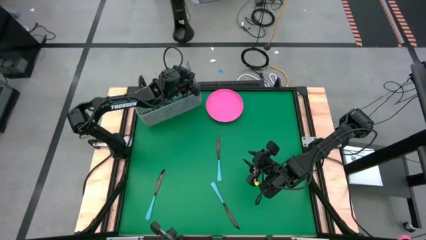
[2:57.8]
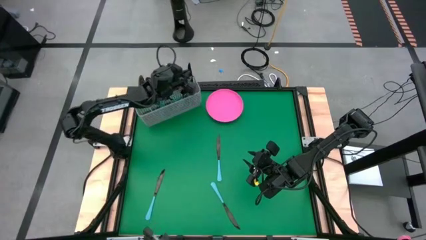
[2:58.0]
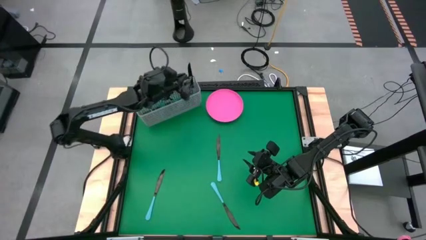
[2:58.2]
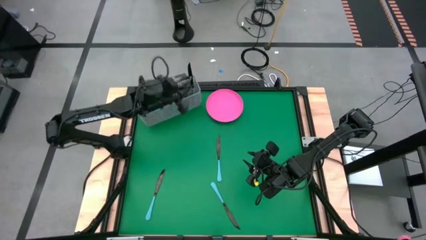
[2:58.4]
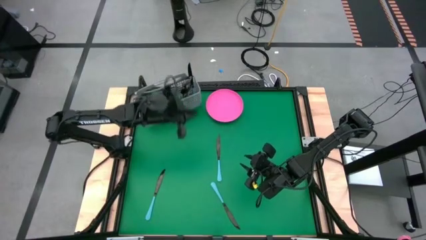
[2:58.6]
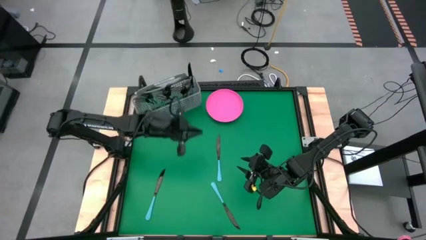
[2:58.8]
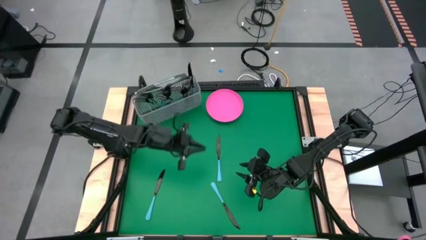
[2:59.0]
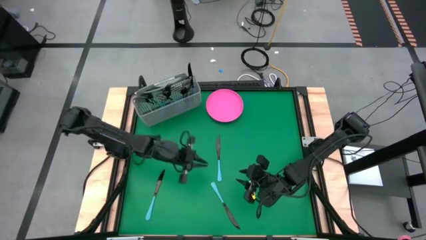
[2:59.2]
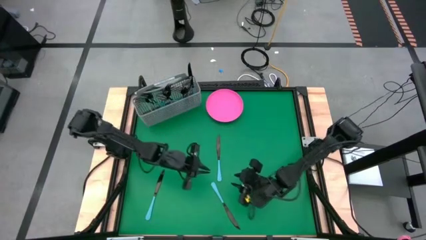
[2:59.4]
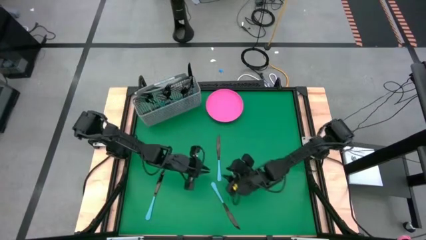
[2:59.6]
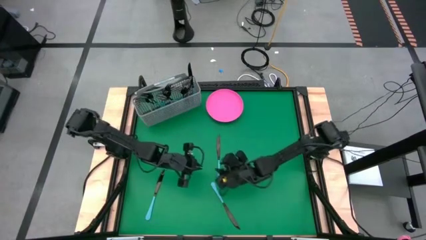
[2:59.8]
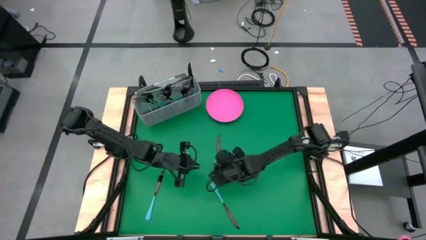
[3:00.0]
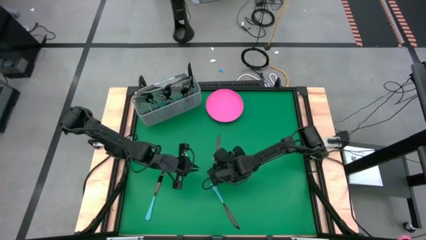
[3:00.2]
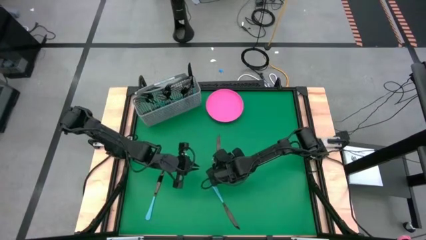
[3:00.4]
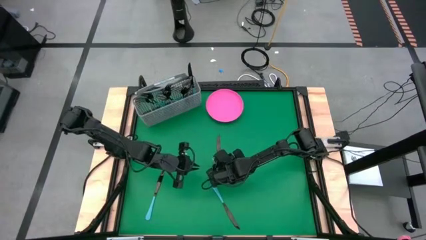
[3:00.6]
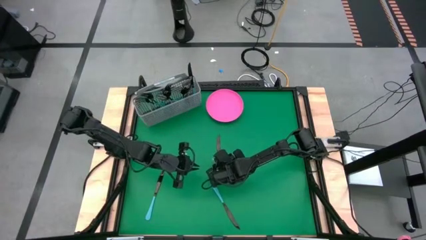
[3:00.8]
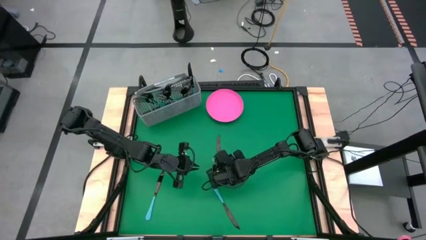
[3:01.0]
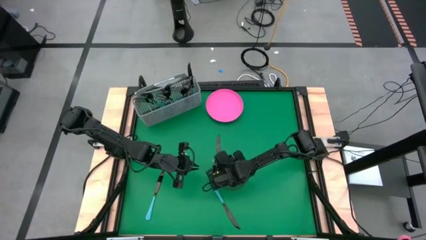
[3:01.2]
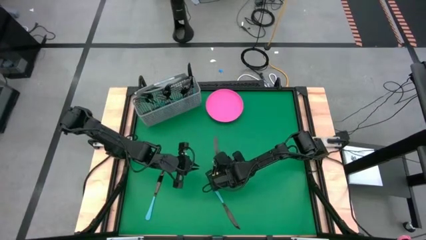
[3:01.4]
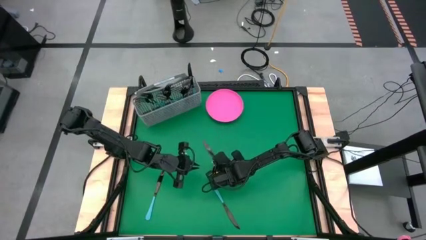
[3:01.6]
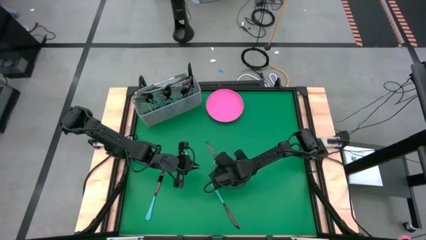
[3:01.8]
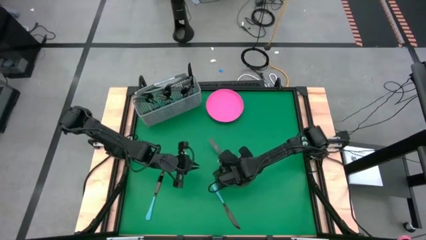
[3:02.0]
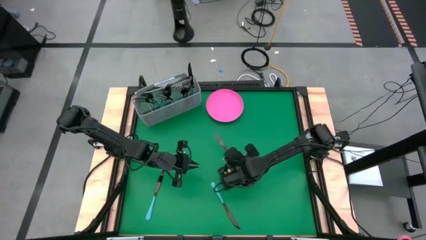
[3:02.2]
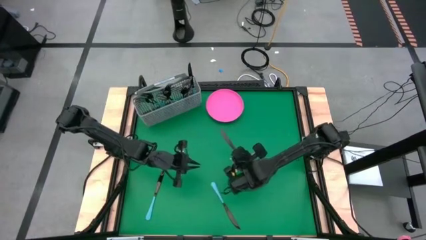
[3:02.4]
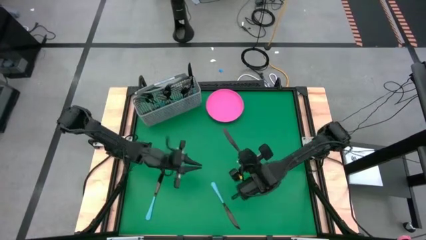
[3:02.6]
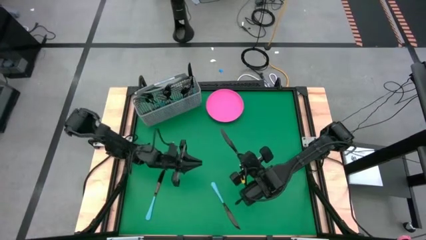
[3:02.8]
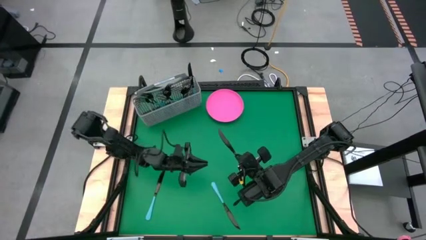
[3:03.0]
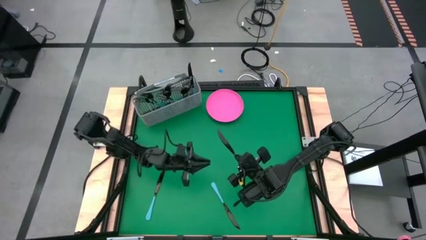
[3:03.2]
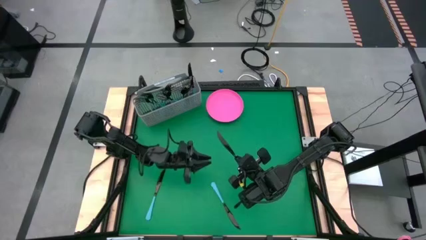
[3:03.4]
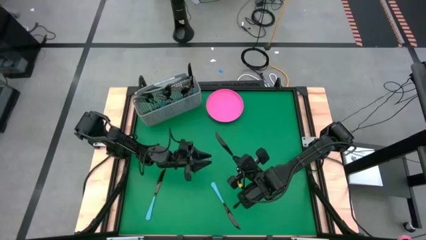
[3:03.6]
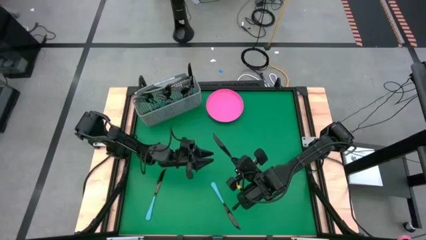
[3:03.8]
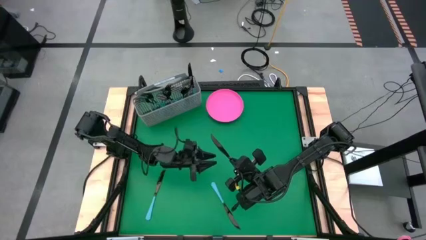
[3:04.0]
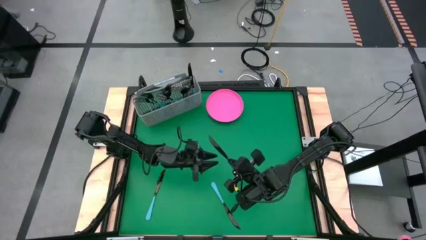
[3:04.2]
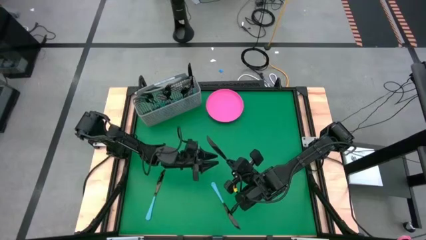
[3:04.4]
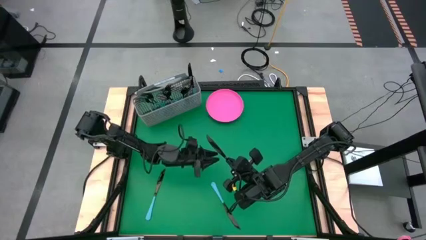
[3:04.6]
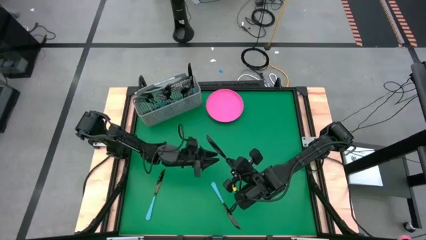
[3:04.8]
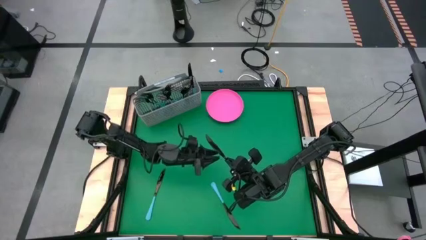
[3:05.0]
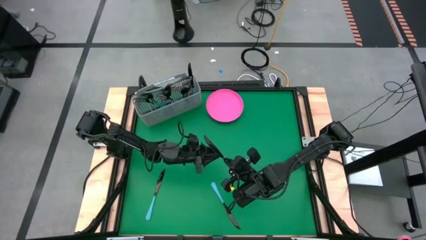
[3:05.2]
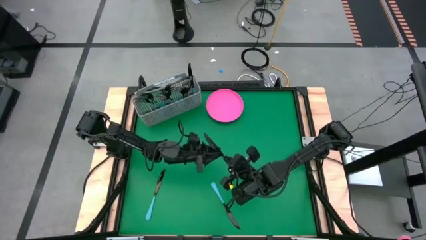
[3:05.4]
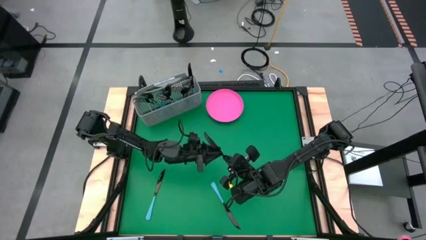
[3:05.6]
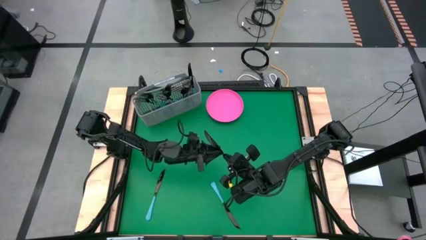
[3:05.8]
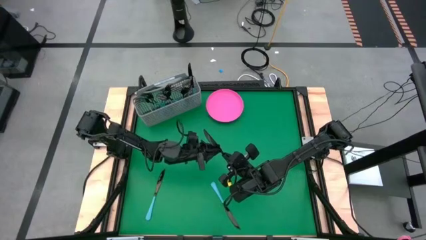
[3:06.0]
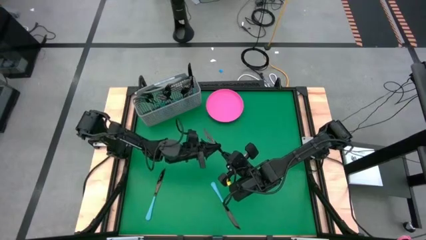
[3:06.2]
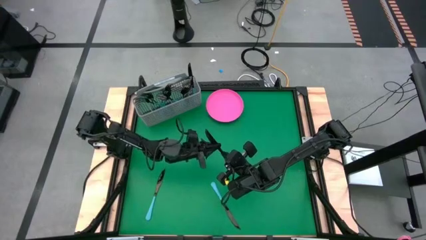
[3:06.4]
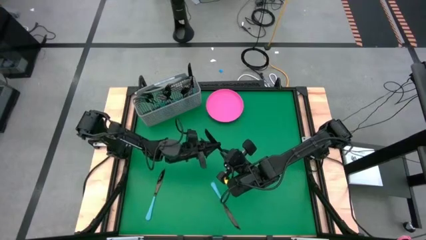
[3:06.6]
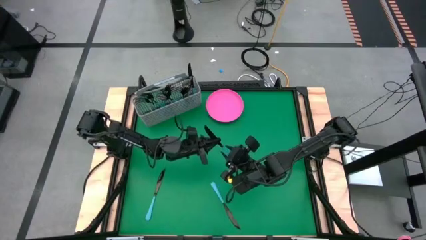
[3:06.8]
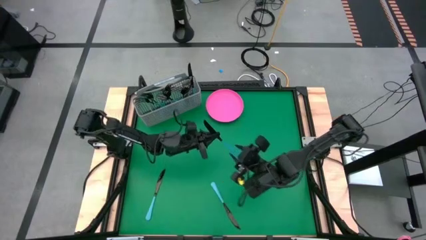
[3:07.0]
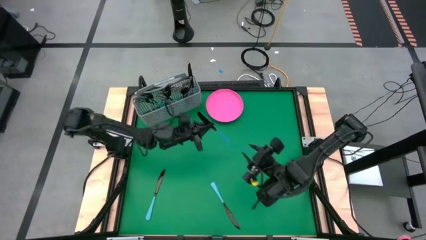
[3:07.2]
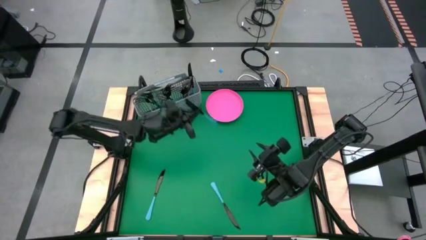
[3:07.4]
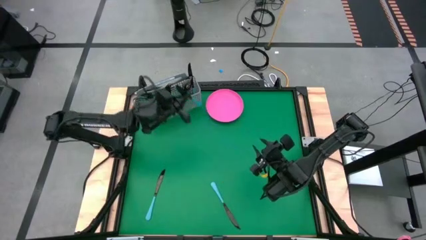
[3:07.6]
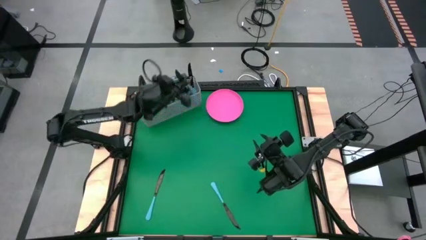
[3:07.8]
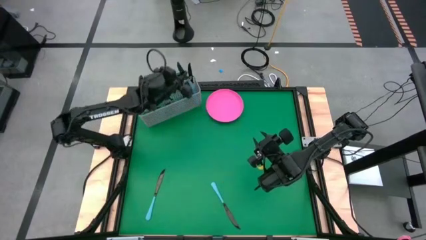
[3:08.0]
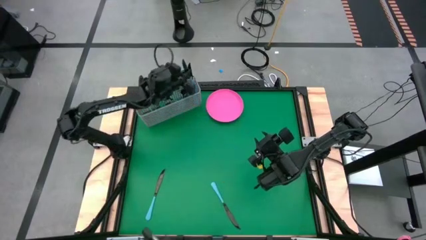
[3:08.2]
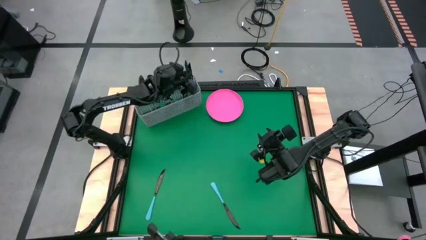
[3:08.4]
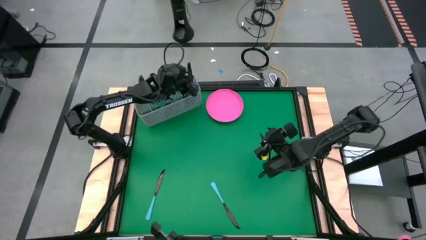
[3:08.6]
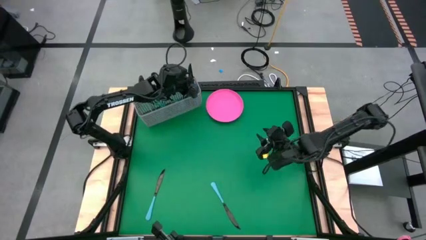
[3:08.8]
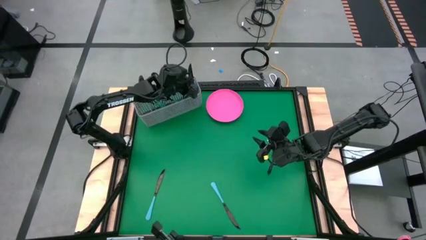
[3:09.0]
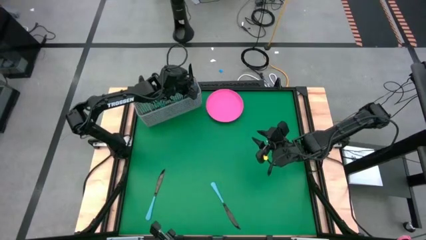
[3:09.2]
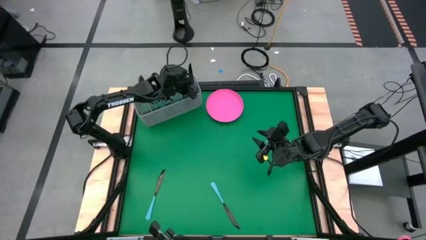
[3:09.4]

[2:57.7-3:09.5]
Task: Sort silverware
Put the blue knife into the gray silverware holder

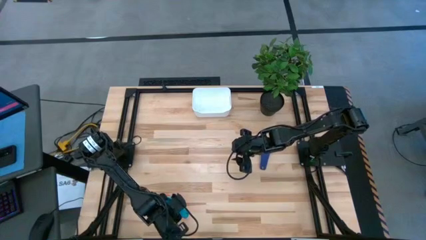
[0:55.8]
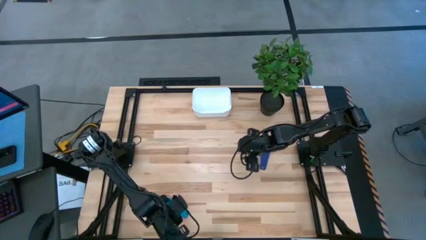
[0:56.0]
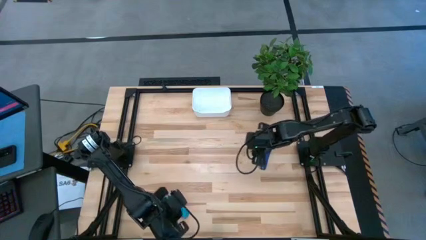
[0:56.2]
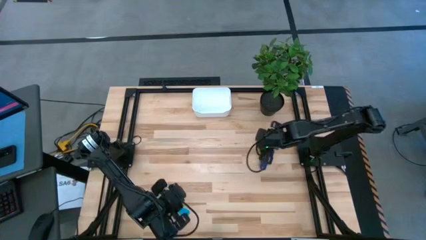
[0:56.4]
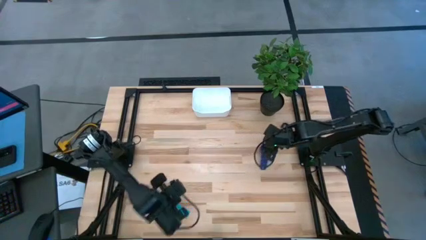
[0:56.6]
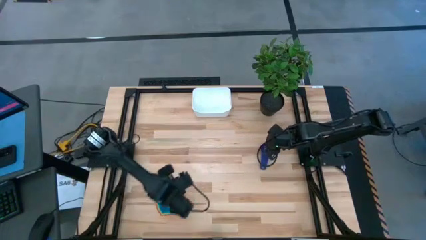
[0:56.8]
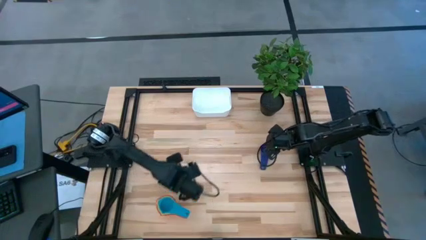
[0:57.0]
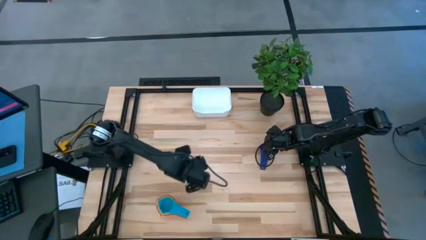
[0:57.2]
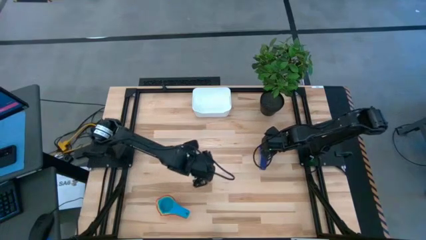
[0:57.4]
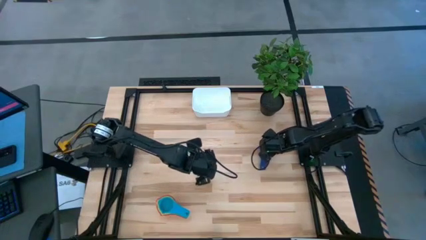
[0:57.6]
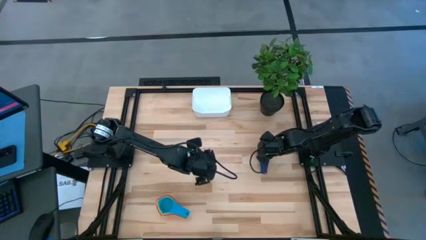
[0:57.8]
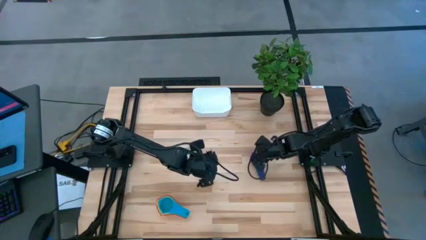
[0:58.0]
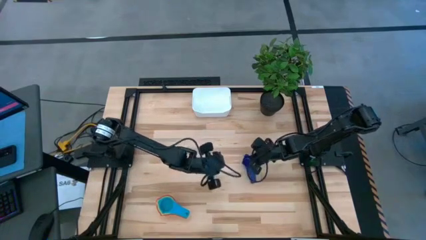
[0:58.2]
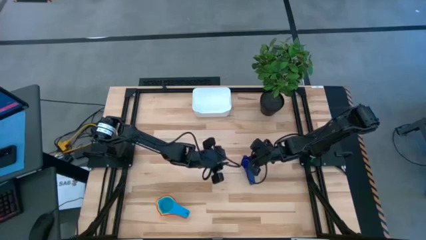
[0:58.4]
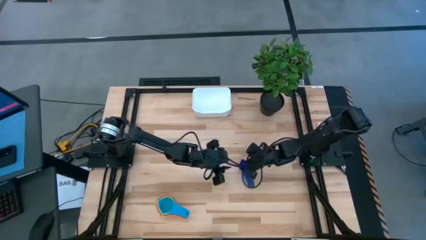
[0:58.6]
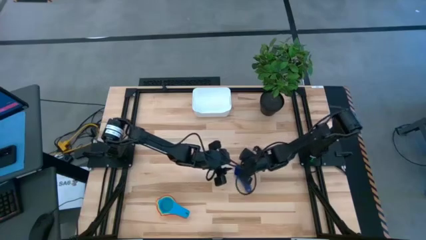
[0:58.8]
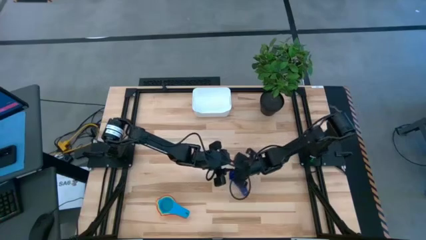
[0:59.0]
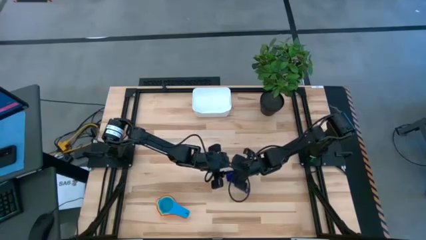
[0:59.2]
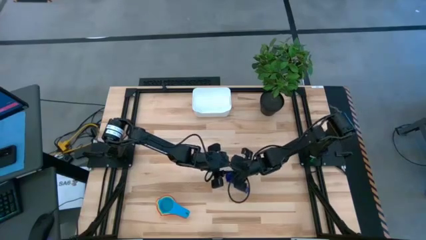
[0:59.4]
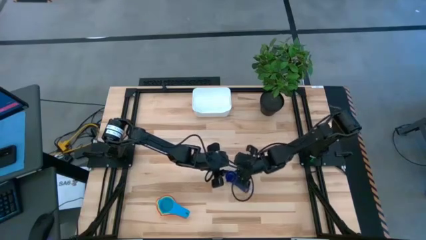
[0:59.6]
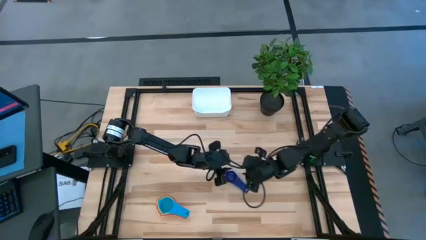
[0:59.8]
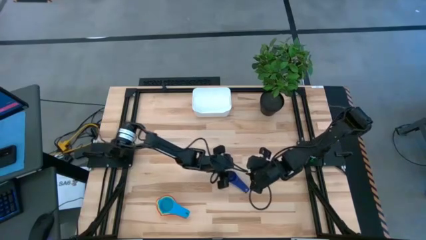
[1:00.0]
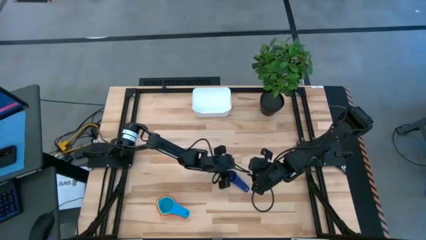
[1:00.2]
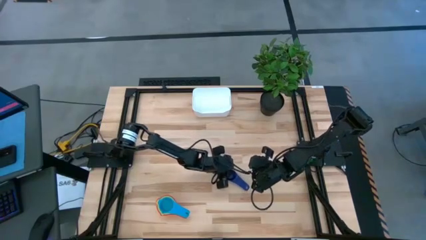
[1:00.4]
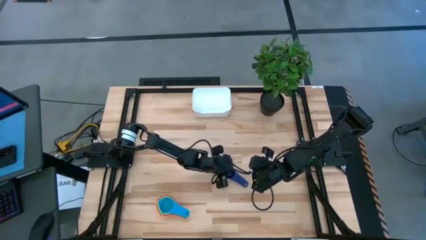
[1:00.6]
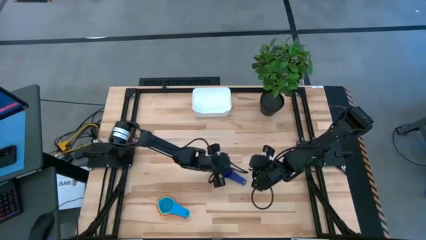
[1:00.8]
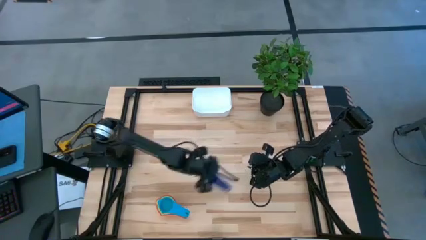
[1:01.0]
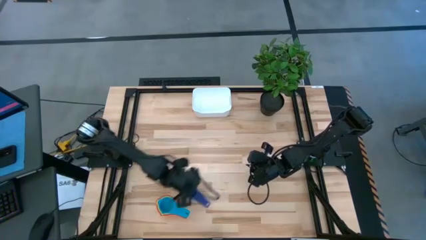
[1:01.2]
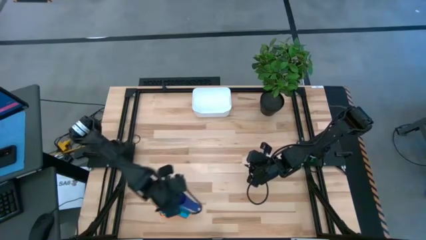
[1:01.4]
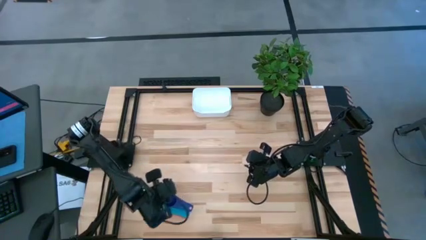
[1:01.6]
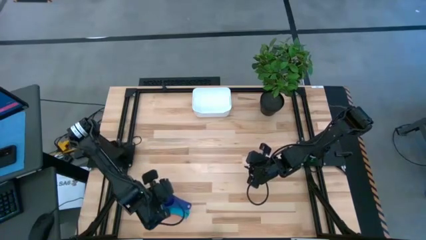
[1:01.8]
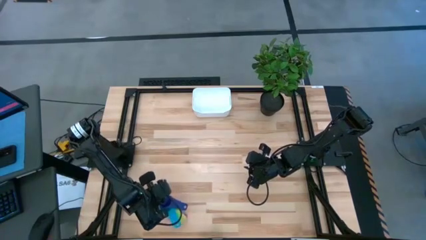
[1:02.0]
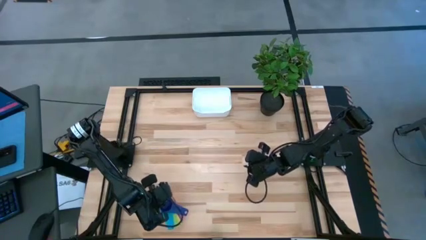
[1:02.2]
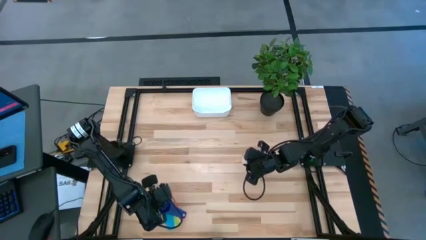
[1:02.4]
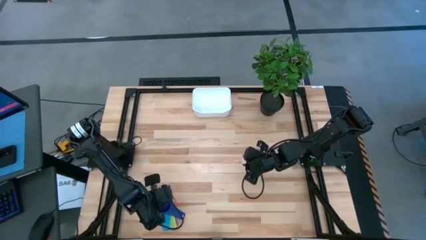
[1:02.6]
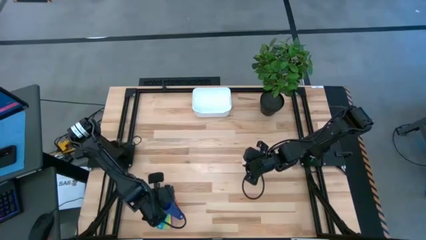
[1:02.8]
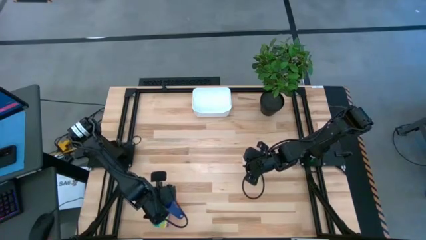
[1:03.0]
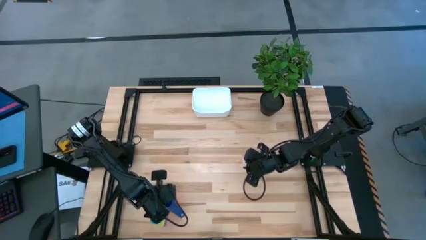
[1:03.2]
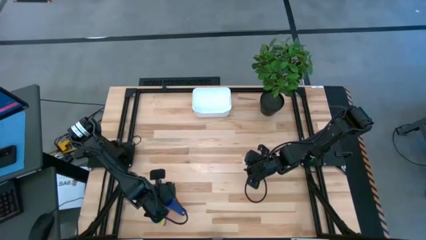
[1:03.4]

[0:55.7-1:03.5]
Task: Nest measuring cups in basket
Stack the dark purple measuring cup into the light blue measuring cup
